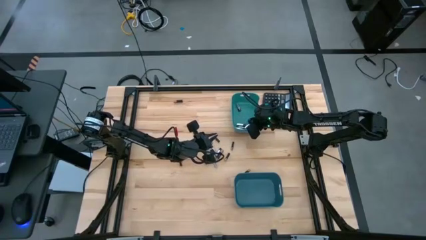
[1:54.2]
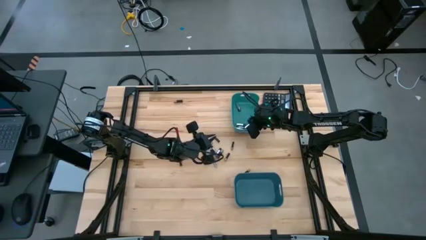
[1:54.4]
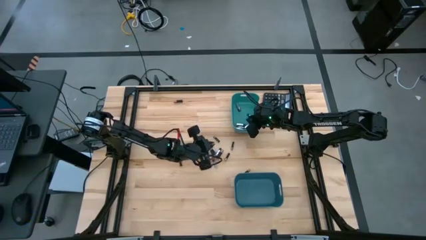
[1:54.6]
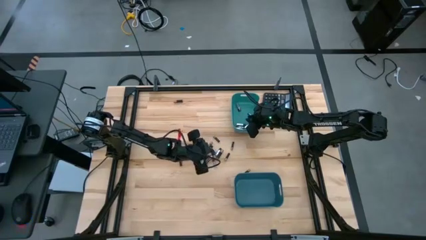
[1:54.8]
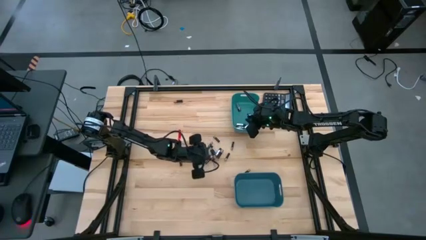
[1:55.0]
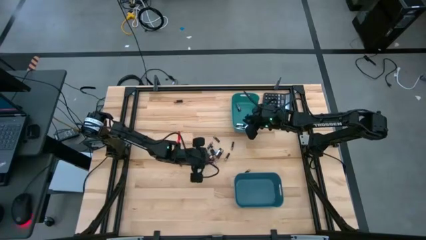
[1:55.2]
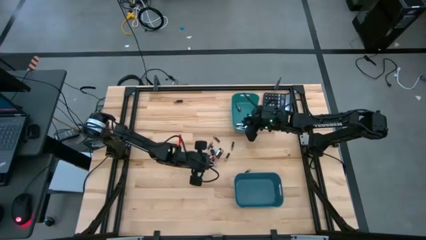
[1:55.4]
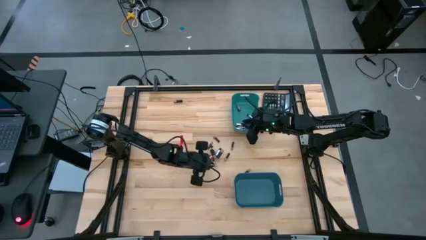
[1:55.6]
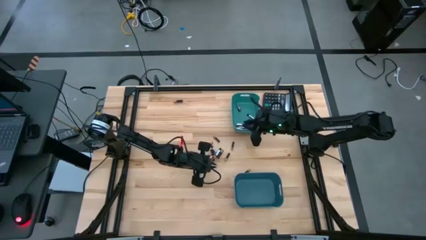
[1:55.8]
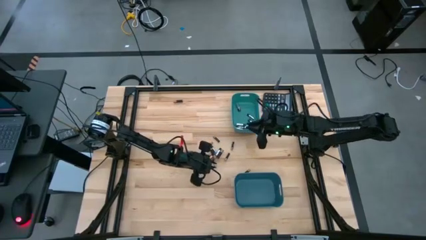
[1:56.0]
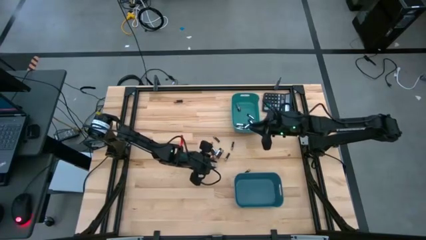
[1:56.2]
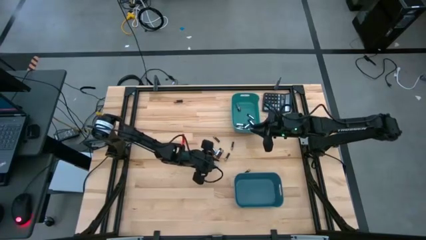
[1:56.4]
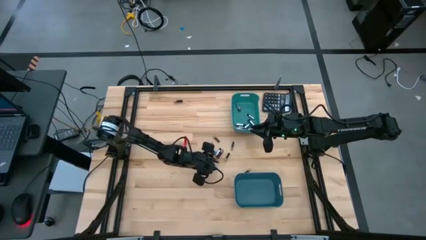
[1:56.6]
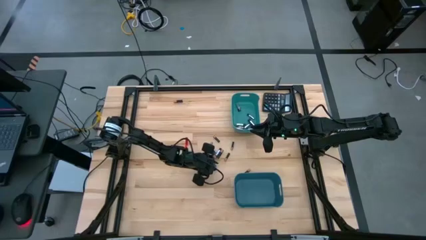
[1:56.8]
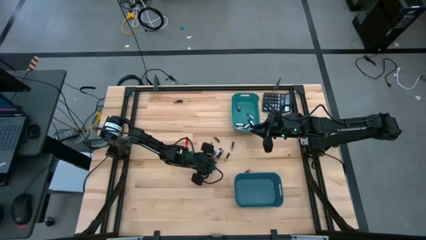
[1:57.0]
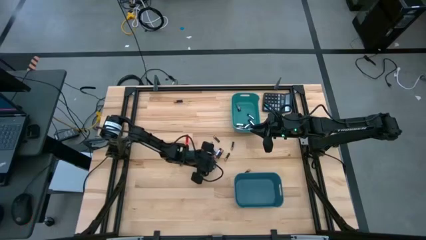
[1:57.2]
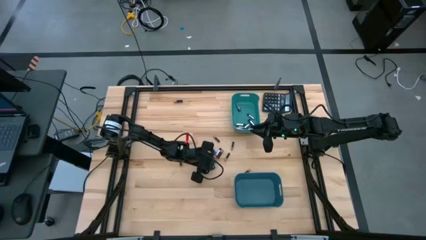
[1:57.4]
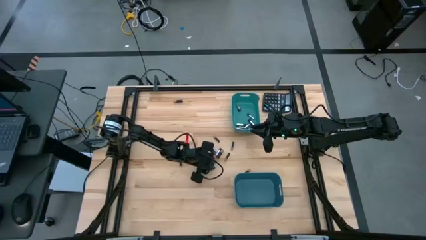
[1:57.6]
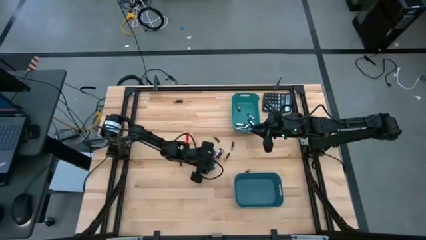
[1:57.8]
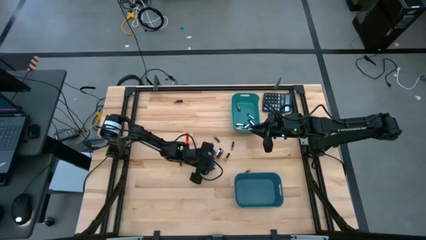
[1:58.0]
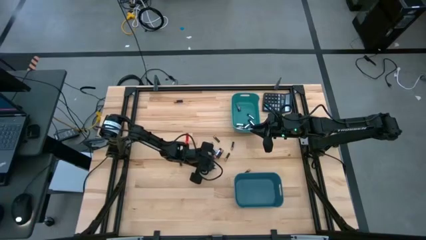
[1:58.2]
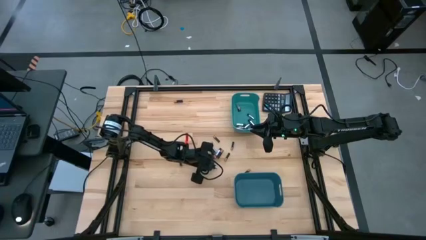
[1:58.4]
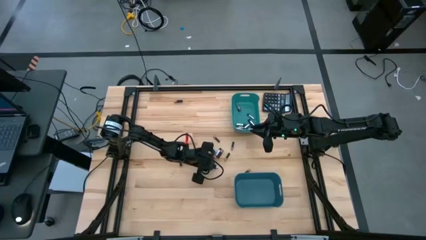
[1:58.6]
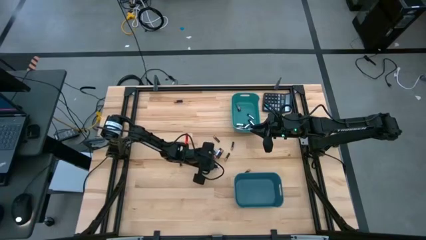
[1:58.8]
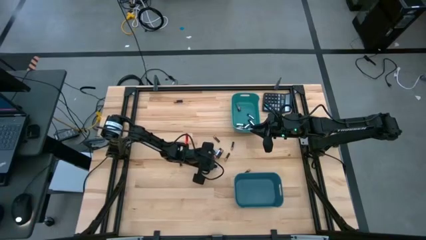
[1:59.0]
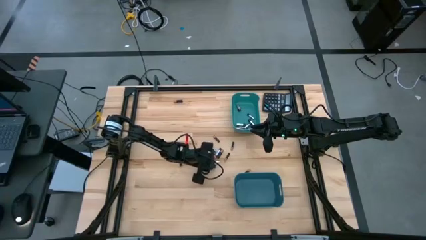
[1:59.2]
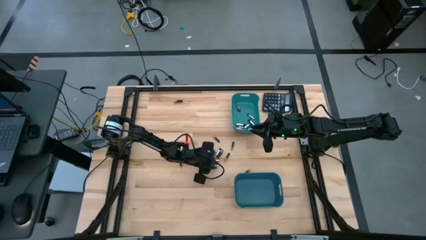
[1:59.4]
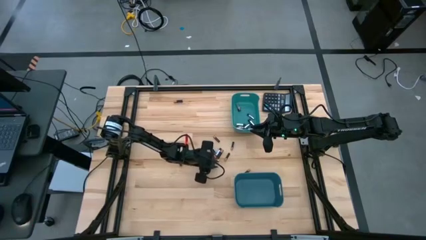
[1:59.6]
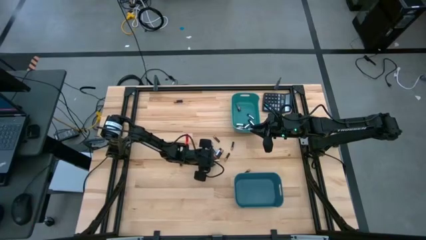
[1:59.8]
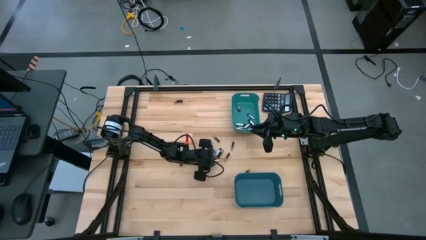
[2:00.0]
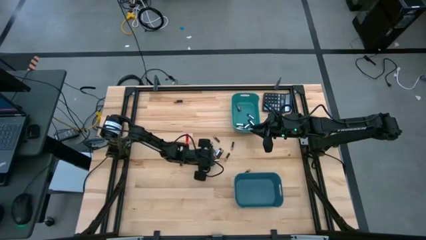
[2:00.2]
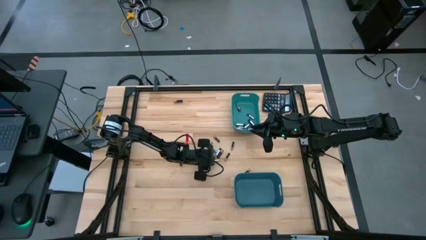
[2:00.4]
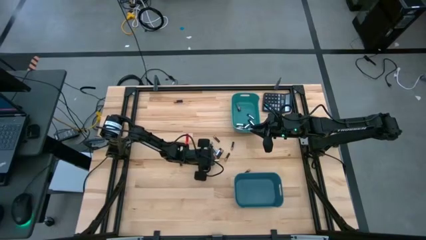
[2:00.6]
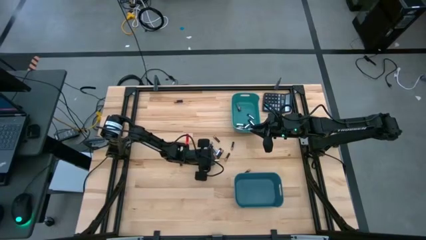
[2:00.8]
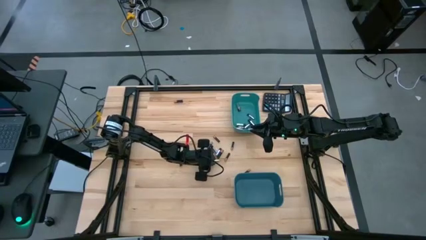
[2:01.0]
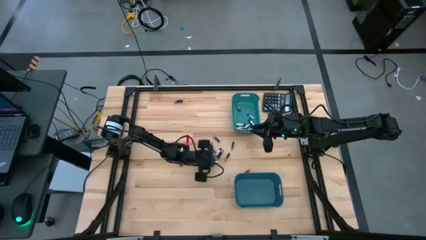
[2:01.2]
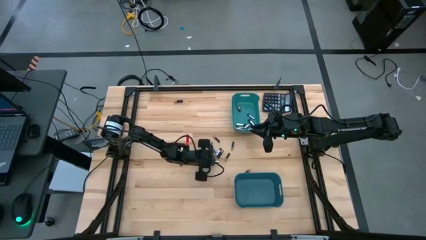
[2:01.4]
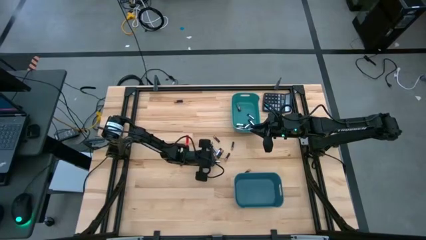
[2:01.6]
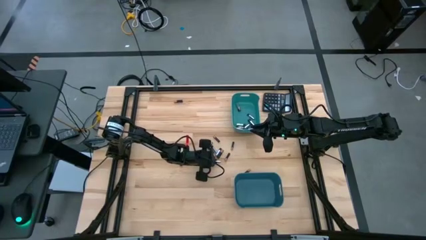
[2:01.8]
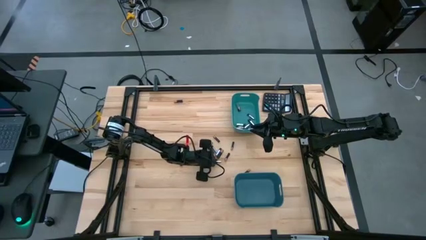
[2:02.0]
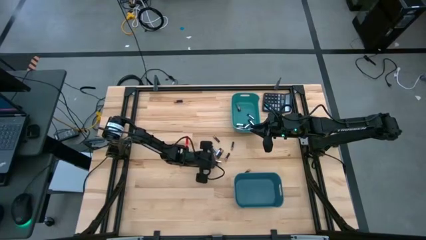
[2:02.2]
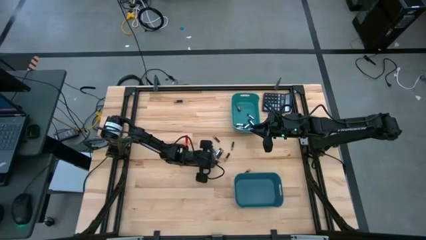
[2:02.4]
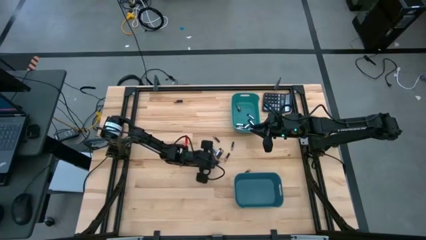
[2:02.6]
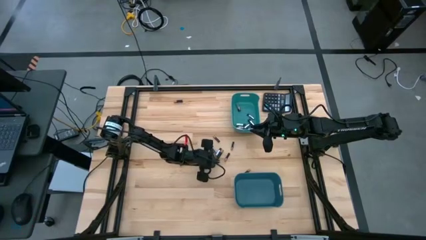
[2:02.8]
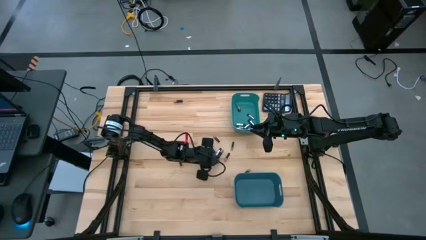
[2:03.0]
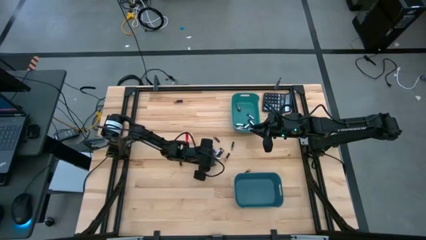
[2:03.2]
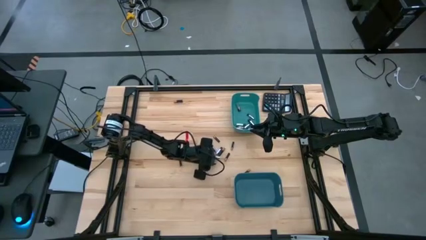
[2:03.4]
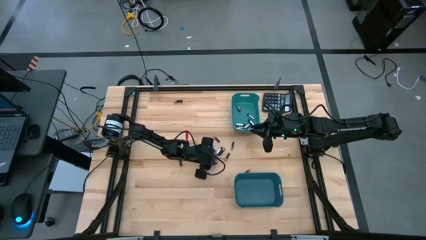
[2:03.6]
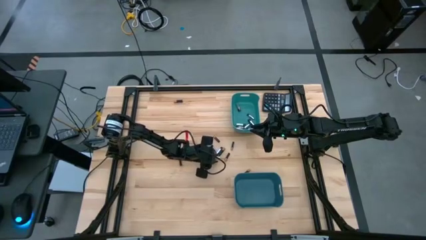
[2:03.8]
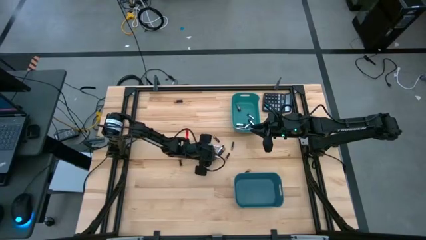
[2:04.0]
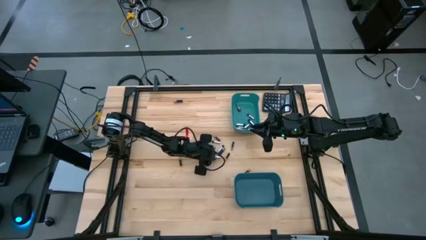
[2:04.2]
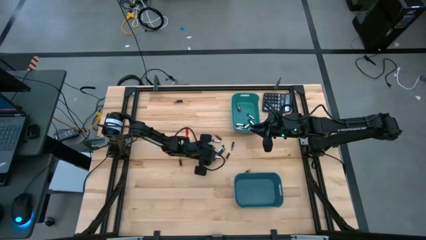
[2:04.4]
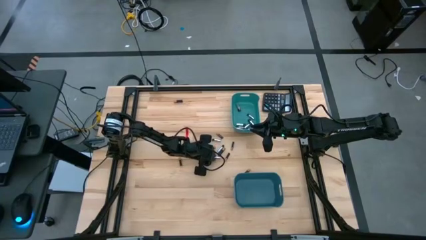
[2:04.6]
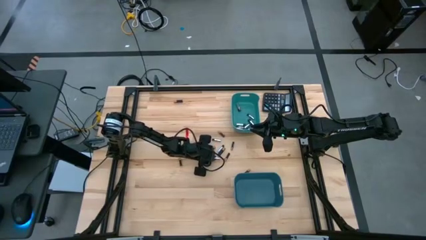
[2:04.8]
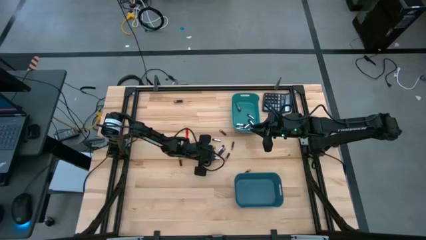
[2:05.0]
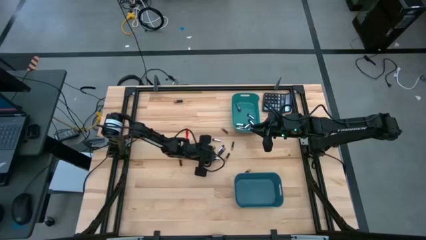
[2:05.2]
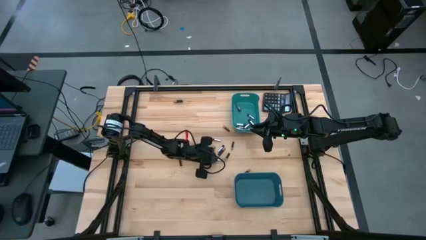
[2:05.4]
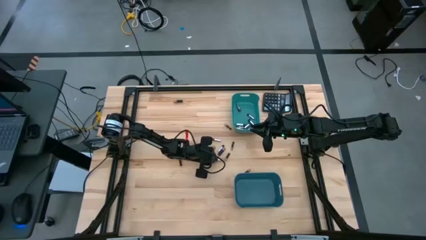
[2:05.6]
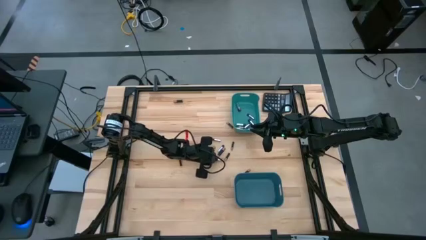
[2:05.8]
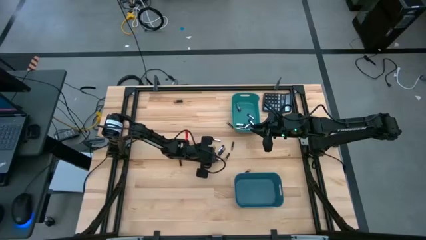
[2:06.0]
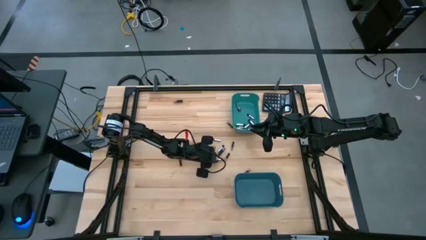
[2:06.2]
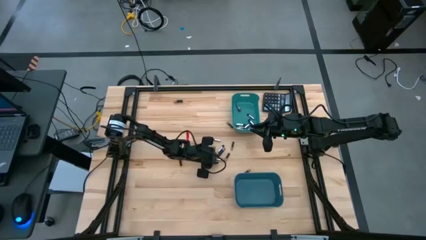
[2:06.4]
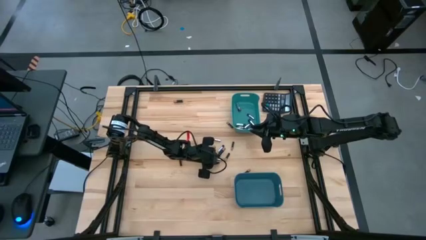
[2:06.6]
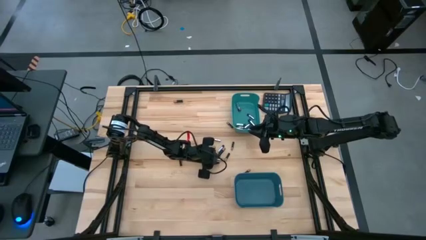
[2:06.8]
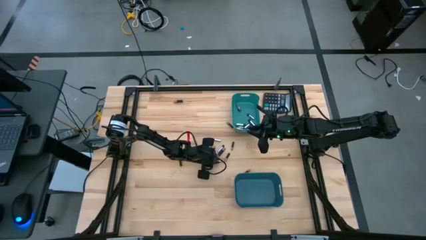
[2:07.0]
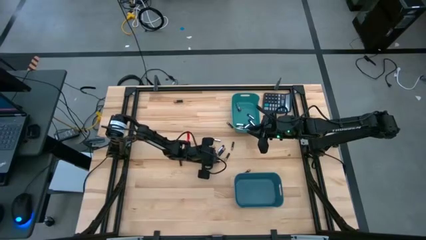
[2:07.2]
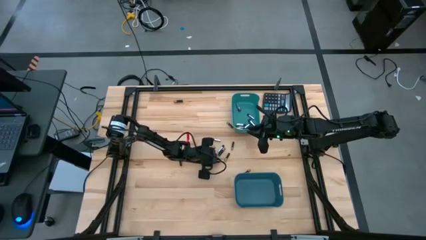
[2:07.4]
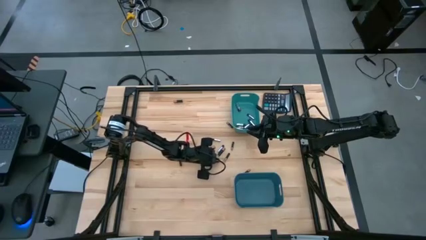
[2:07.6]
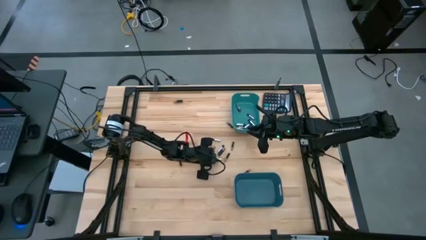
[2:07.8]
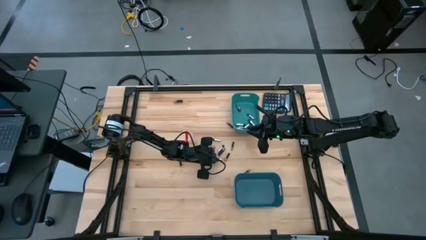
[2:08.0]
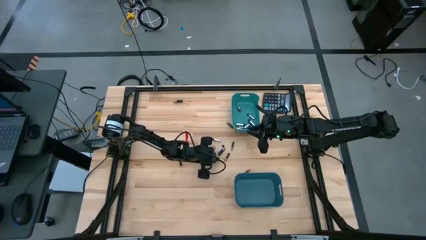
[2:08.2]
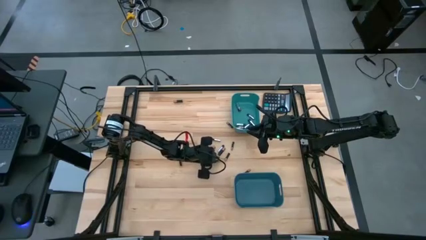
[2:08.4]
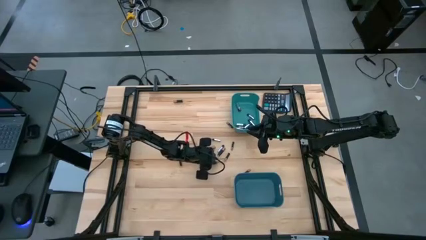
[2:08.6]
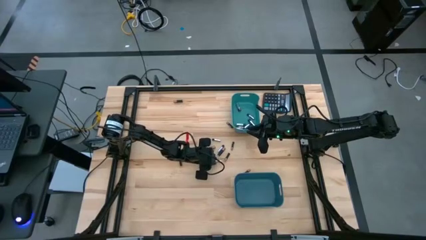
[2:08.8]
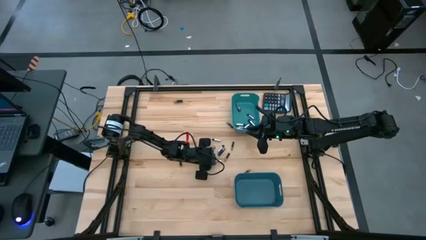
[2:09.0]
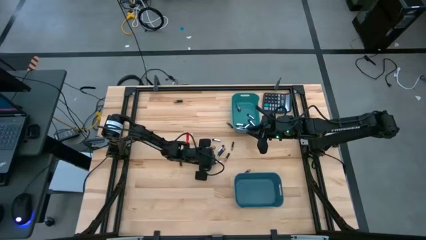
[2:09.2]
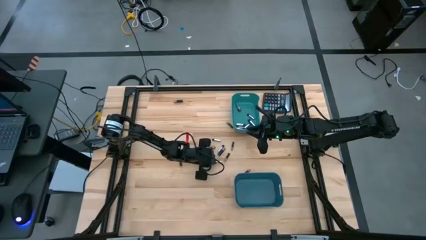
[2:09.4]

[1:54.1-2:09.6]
Task: Sort batteries
Put the silver battery into the green bin

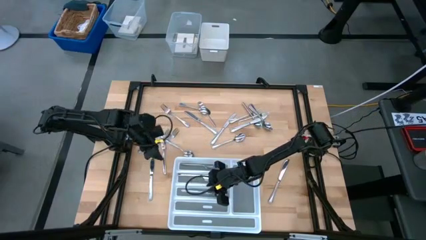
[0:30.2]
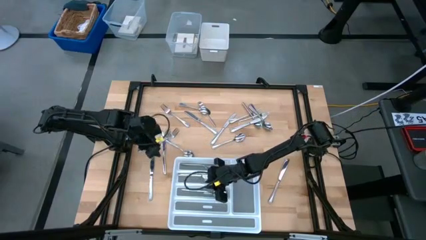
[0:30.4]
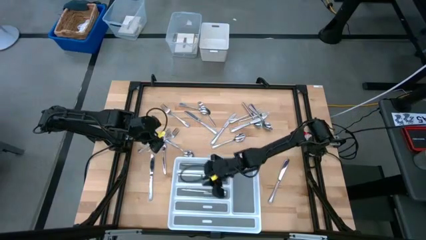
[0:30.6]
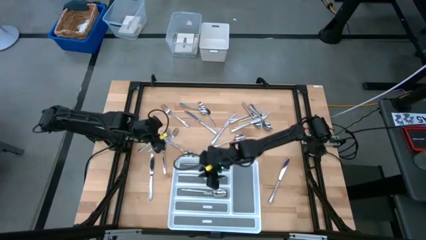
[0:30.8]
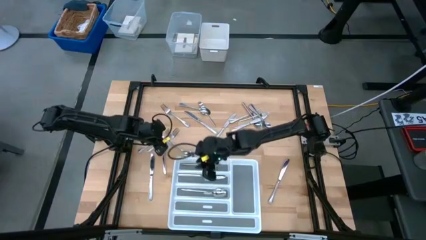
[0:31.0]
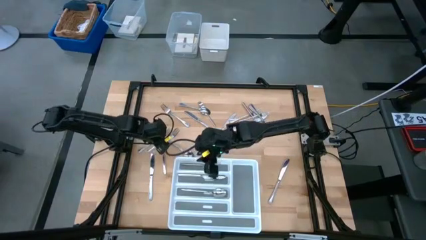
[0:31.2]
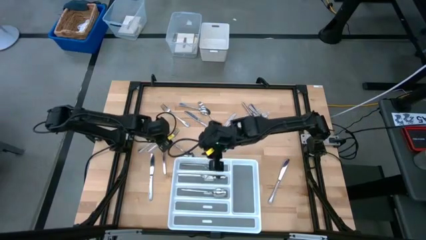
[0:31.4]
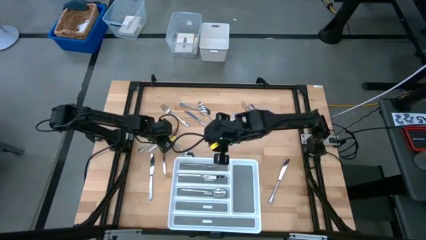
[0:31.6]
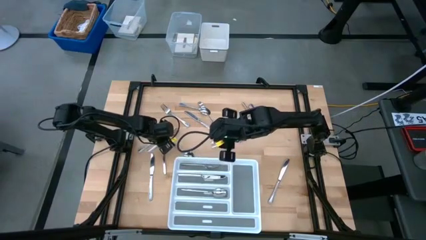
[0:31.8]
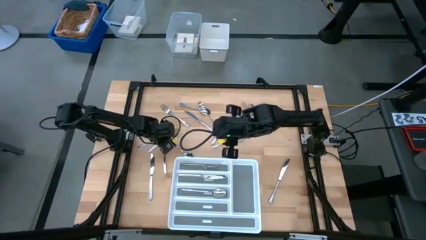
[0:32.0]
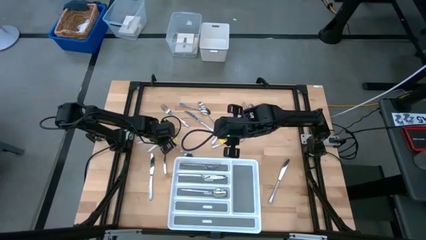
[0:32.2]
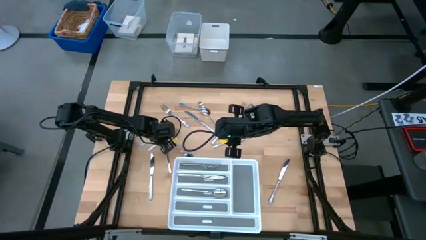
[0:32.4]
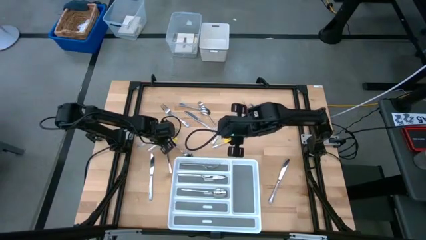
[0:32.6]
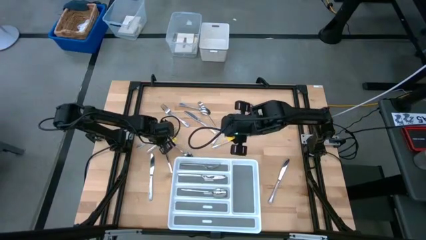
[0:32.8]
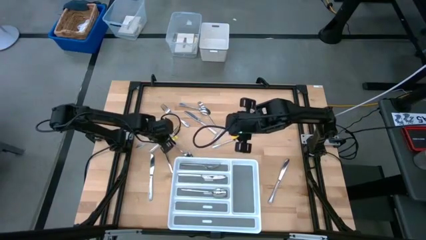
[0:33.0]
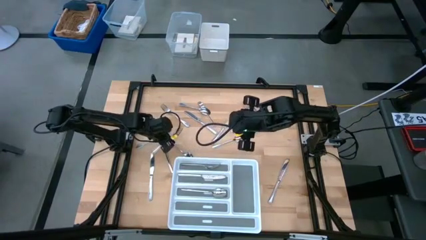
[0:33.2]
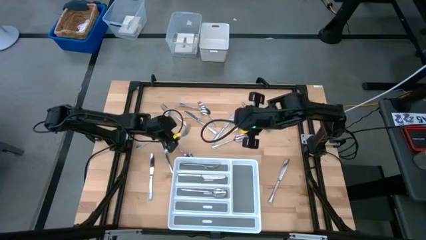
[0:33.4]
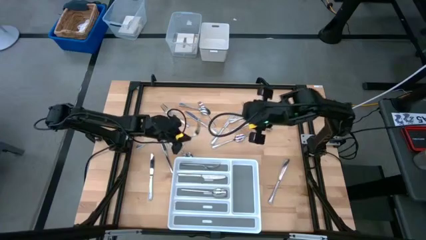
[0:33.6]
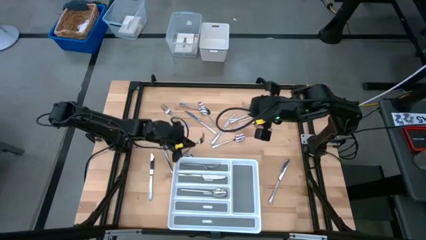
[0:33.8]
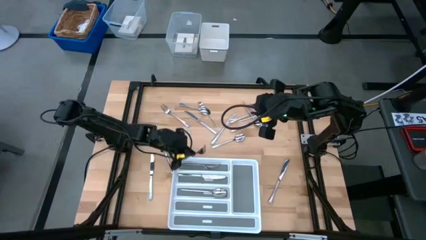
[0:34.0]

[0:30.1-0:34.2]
Task: Sort silverware
Put the silver fork into the top section of the white silverware tray
